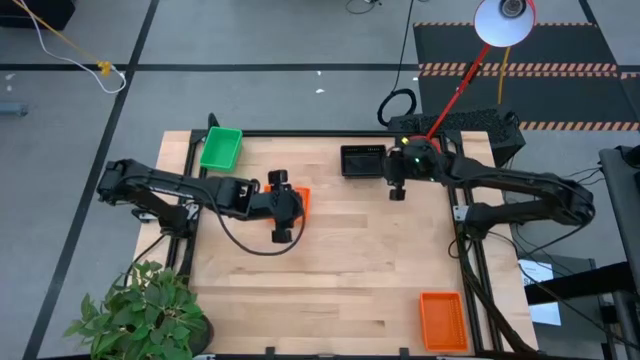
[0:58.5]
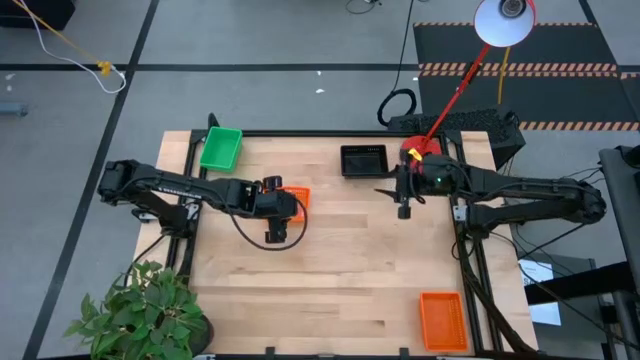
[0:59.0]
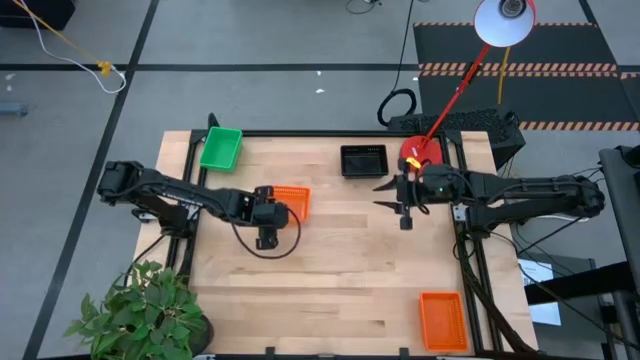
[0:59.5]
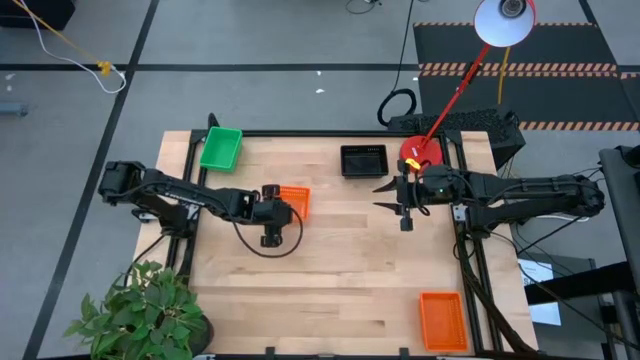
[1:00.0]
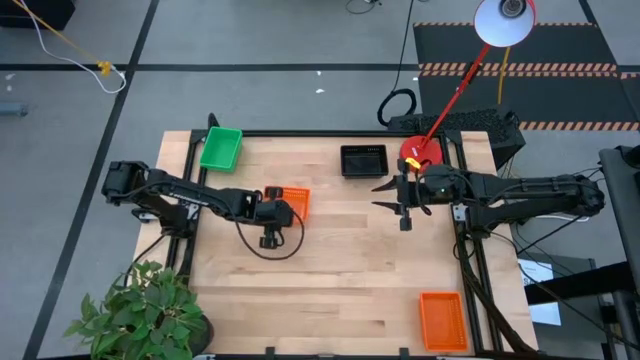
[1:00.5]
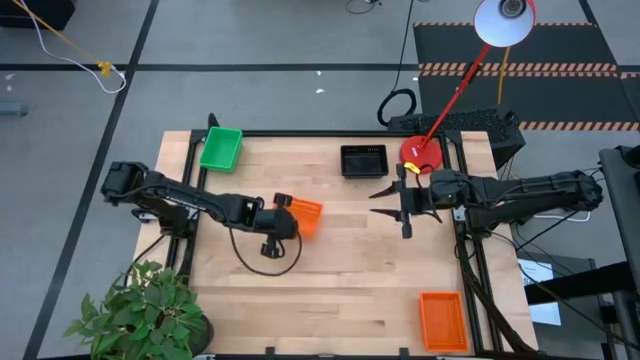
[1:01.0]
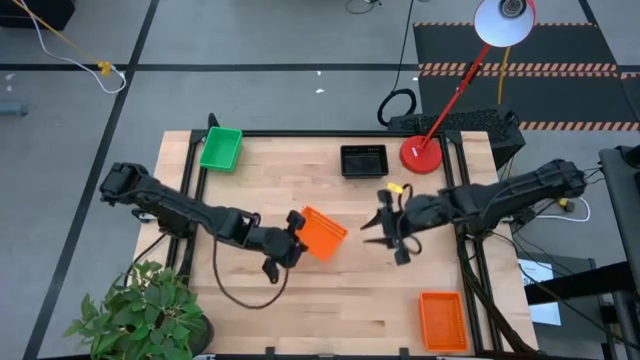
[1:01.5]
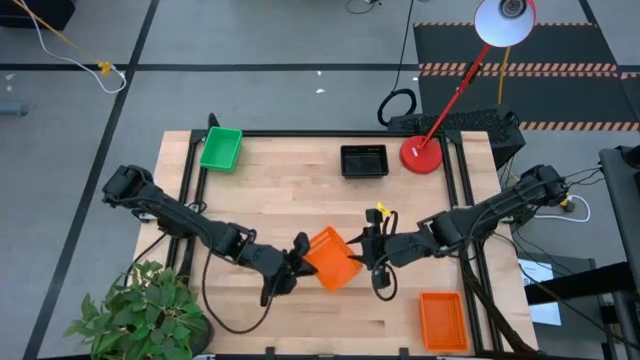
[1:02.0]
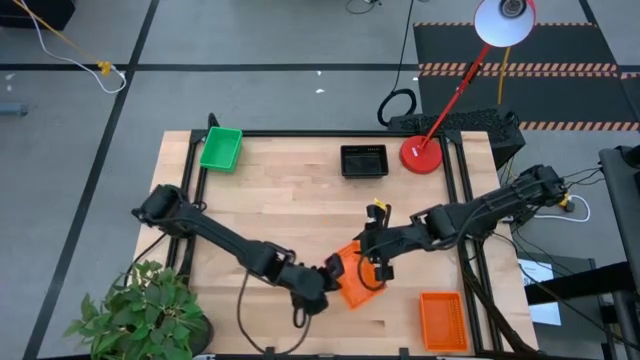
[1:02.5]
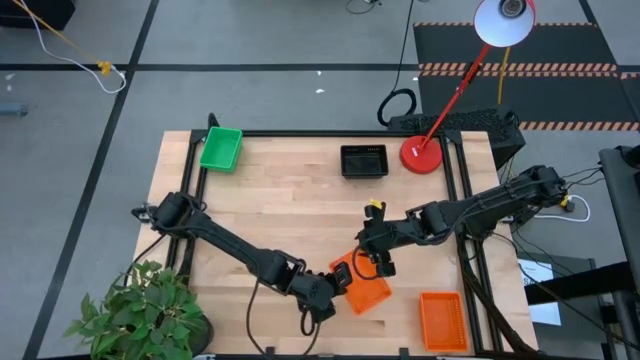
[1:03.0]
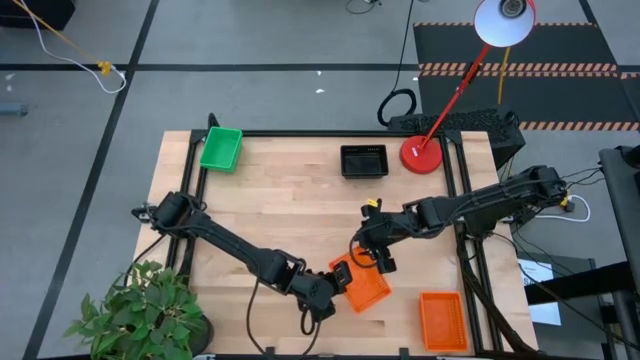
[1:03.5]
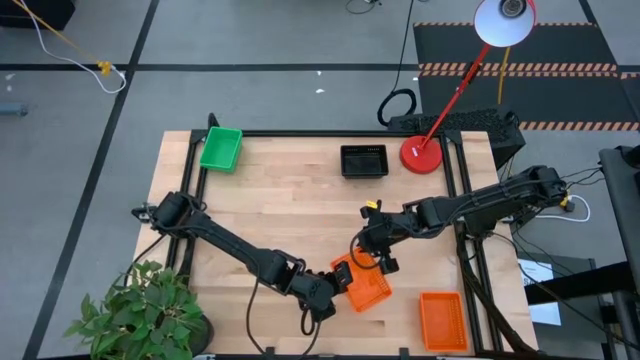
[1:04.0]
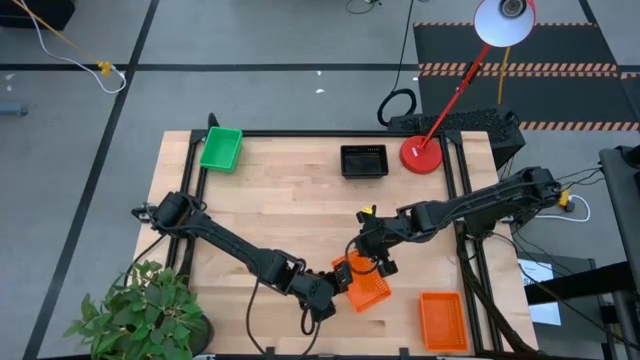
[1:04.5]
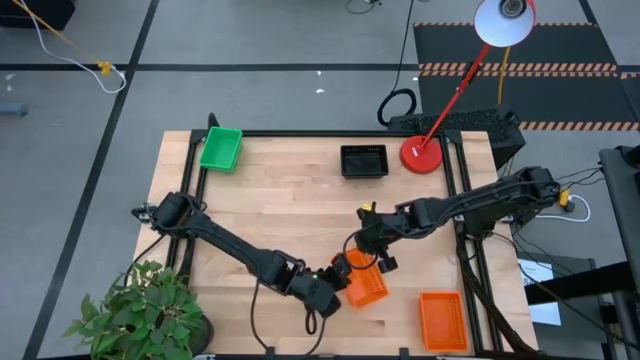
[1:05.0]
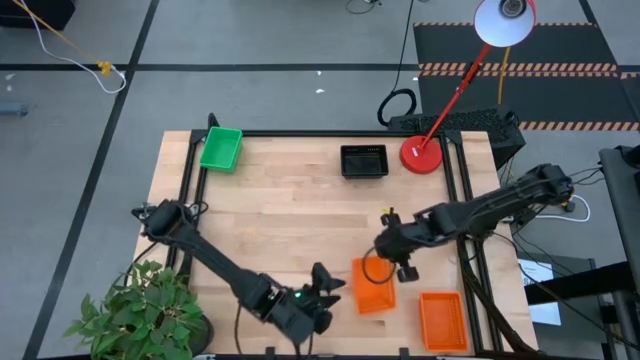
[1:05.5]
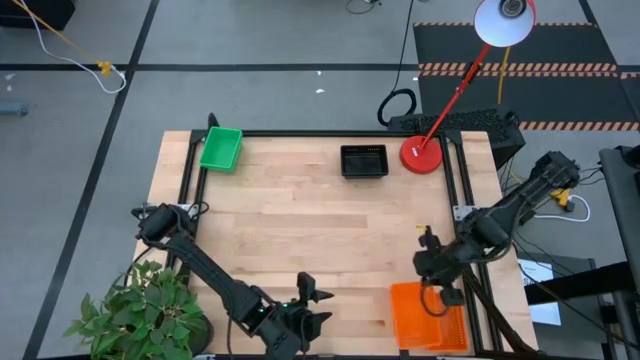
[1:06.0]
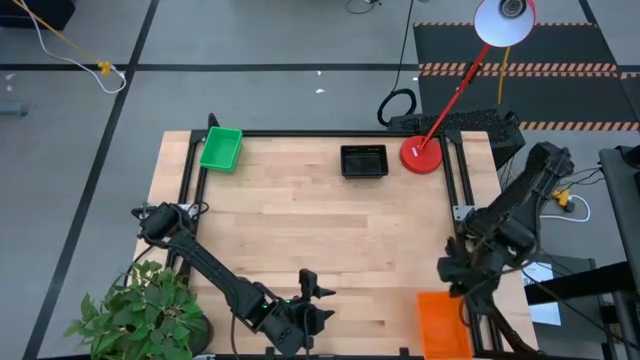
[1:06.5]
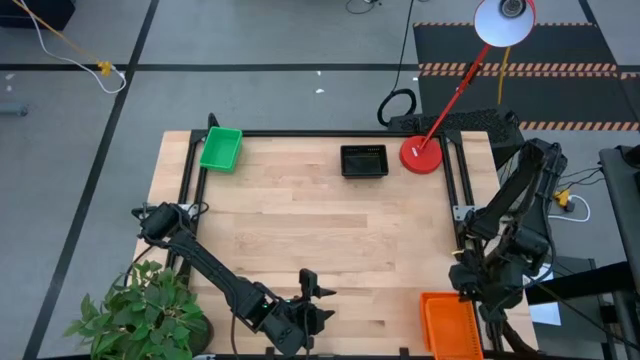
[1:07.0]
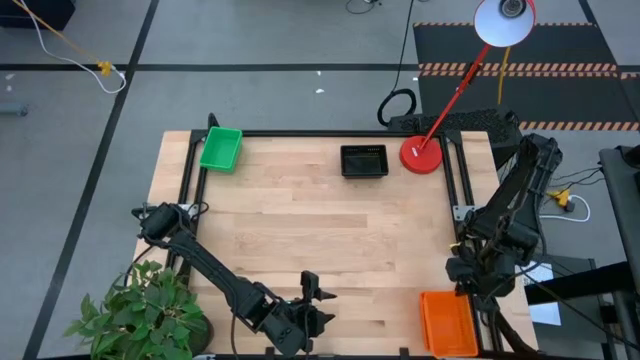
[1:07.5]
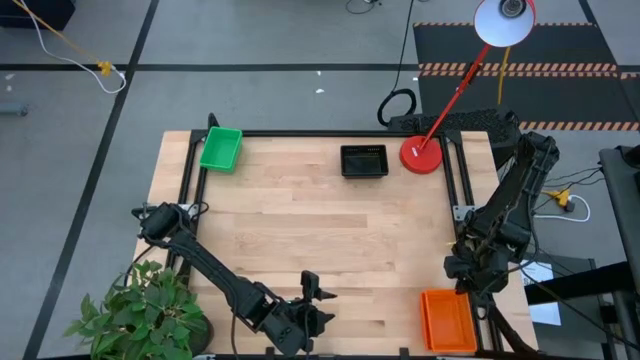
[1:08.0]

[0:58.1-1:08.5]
Stack the left orange bin on top of the right orange bin

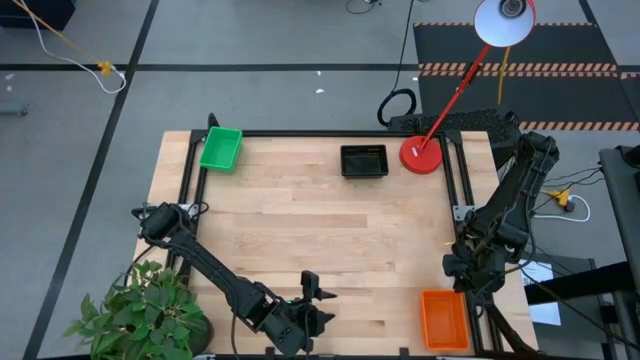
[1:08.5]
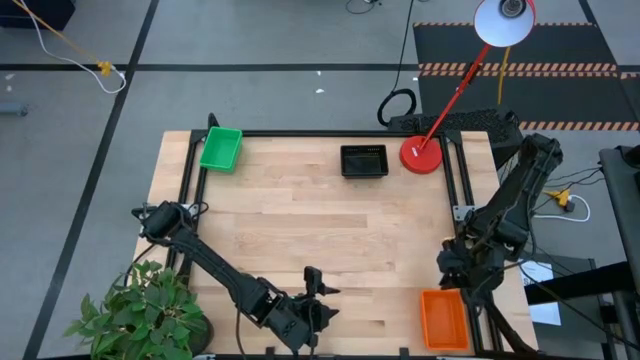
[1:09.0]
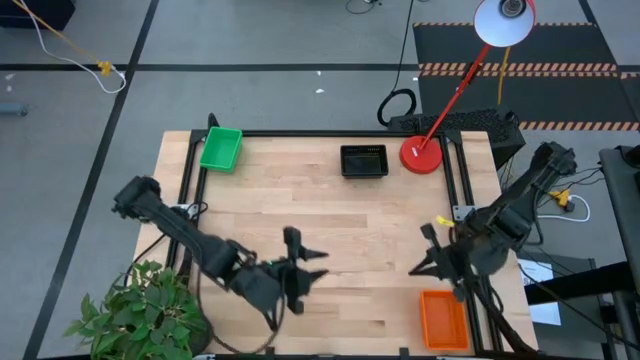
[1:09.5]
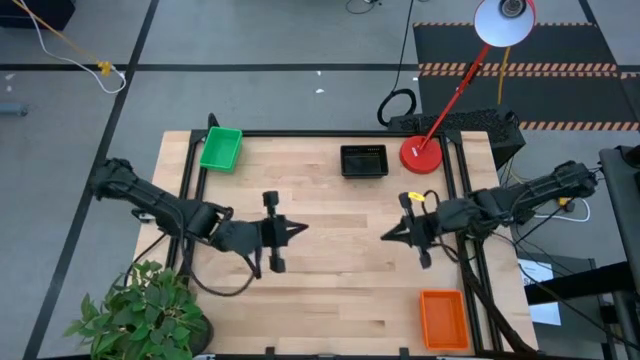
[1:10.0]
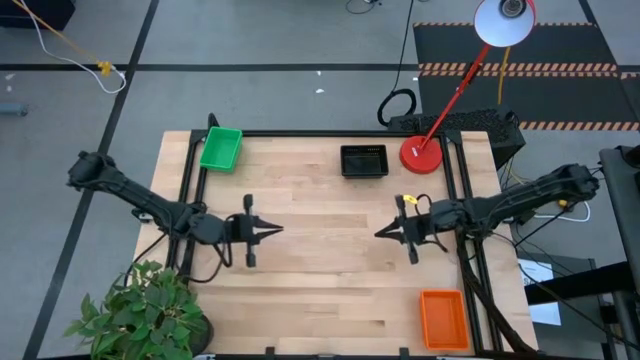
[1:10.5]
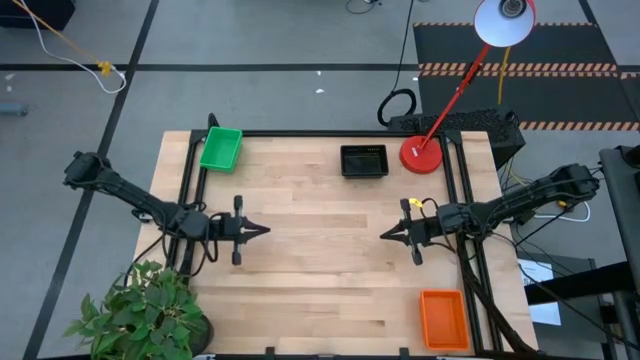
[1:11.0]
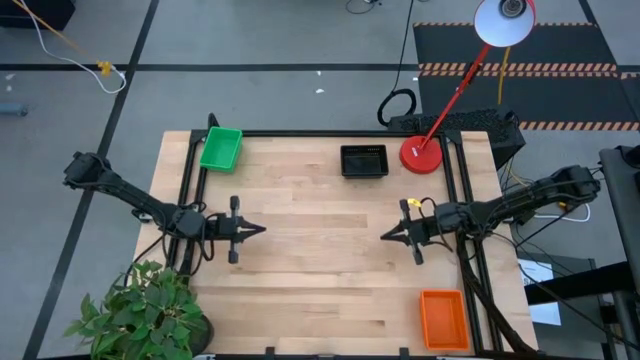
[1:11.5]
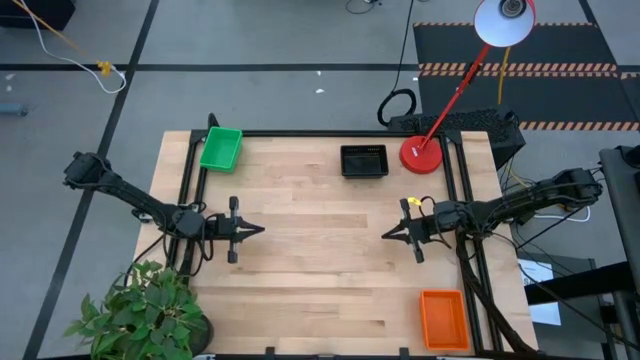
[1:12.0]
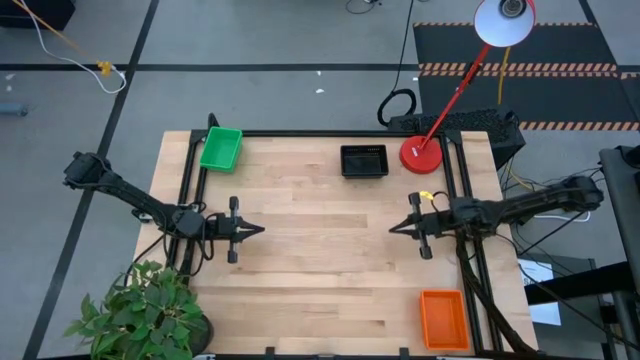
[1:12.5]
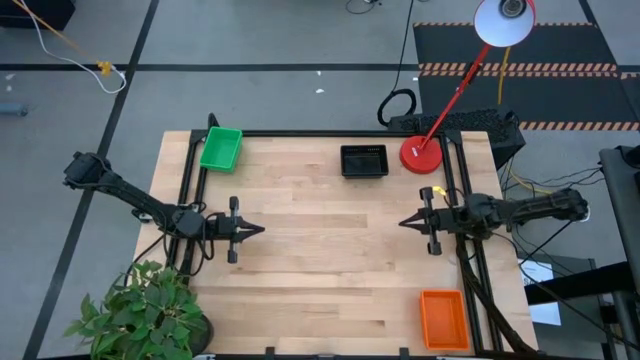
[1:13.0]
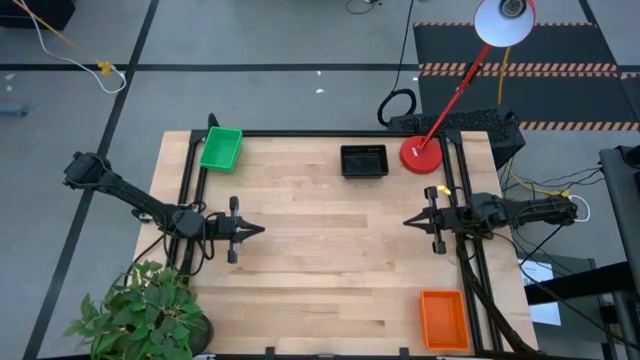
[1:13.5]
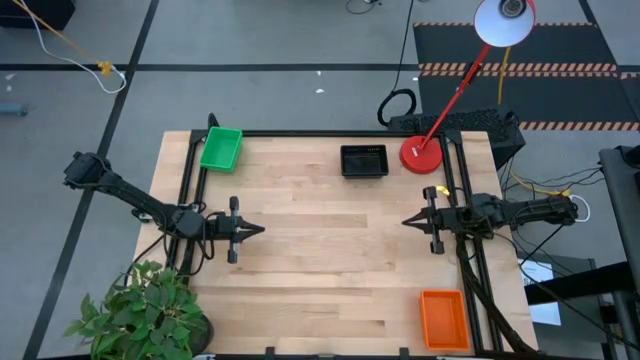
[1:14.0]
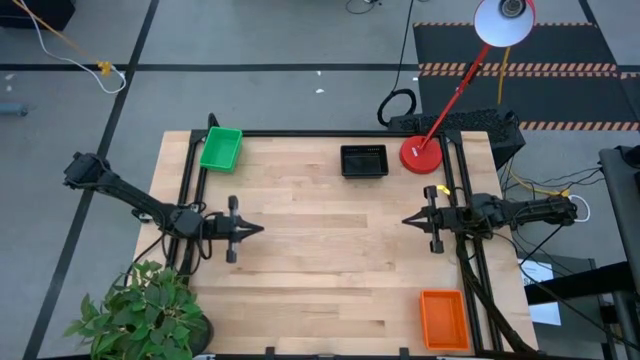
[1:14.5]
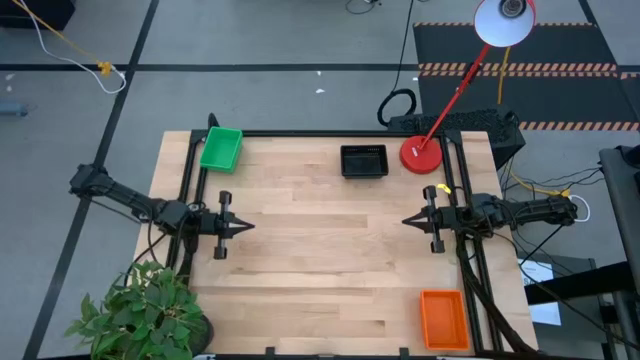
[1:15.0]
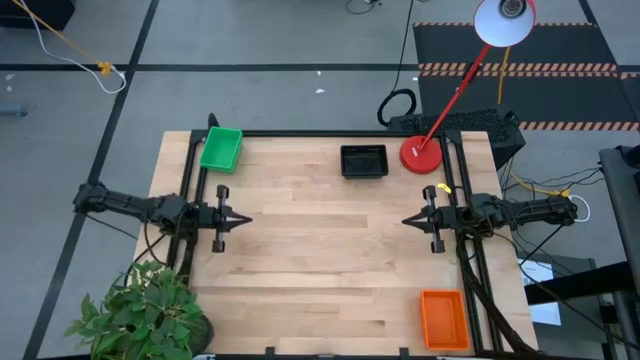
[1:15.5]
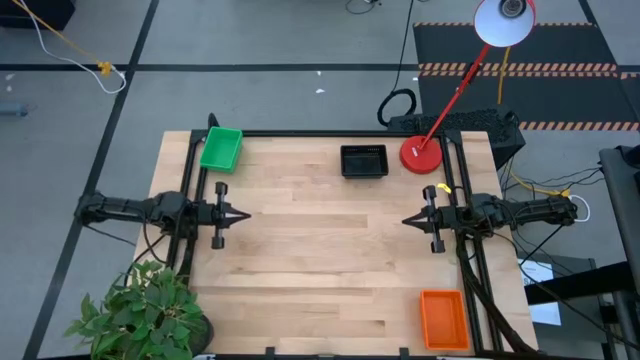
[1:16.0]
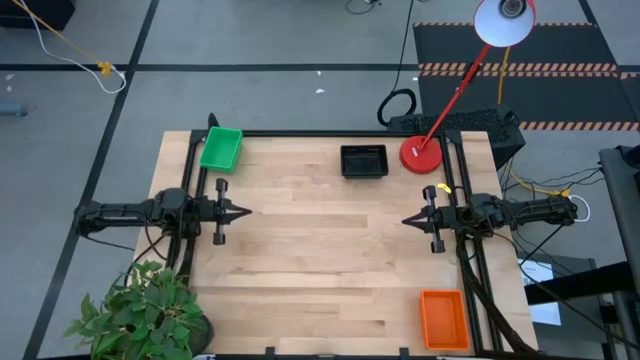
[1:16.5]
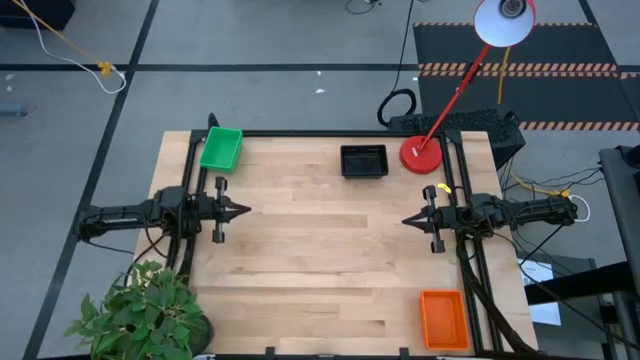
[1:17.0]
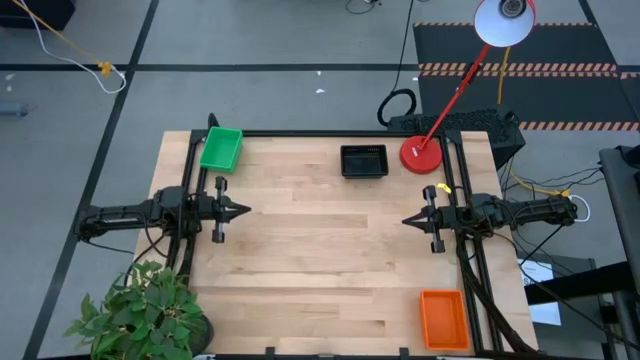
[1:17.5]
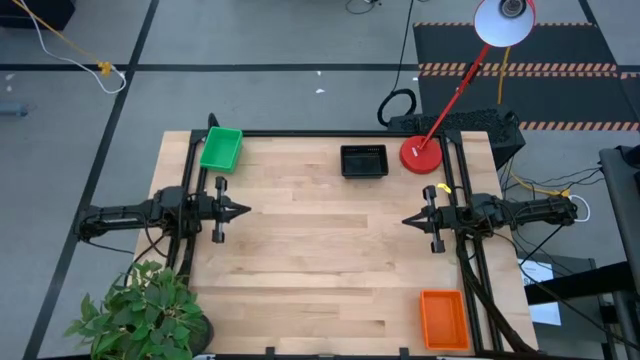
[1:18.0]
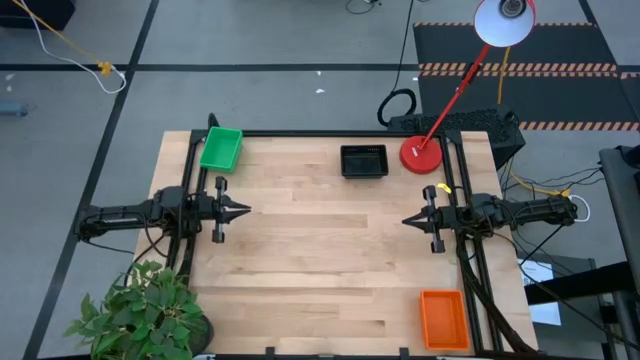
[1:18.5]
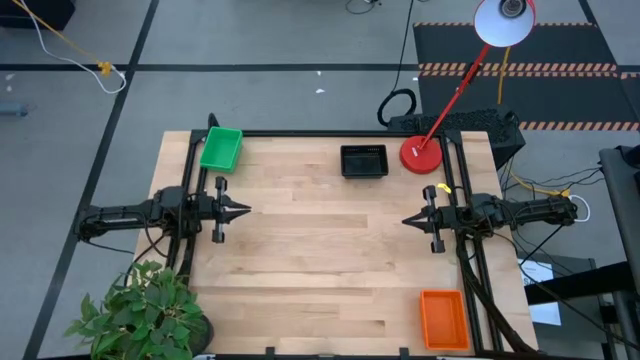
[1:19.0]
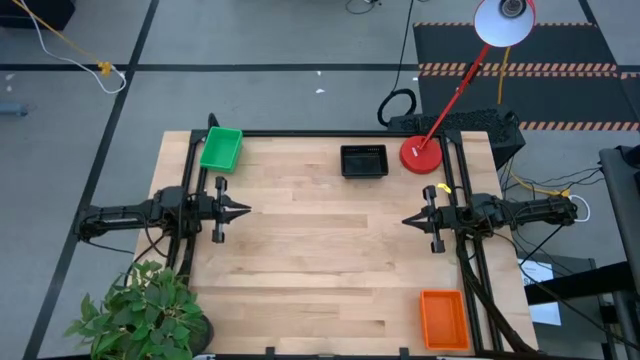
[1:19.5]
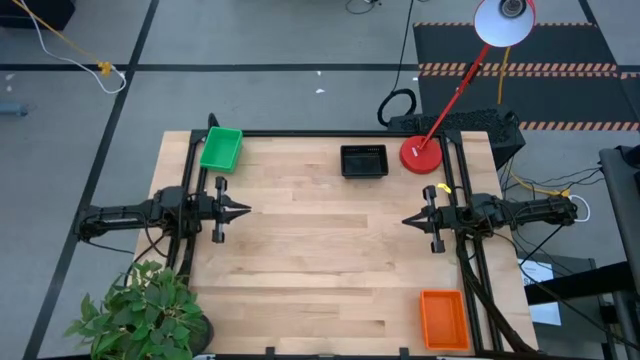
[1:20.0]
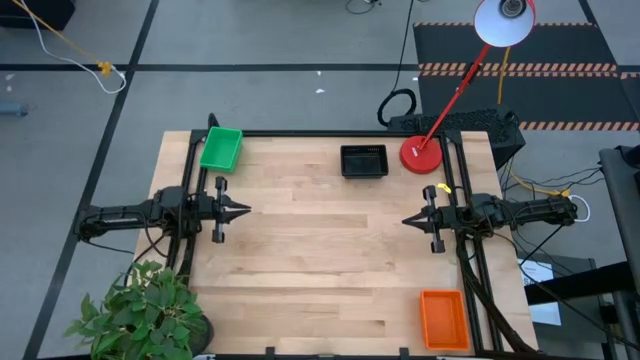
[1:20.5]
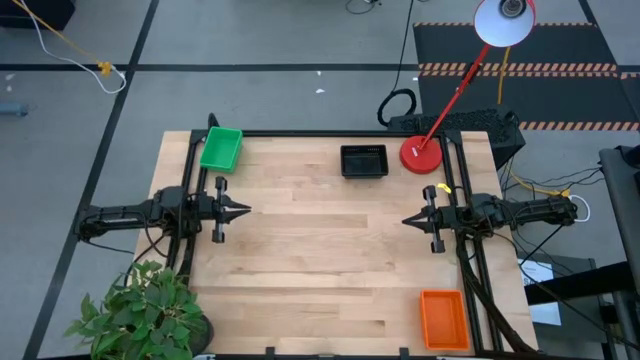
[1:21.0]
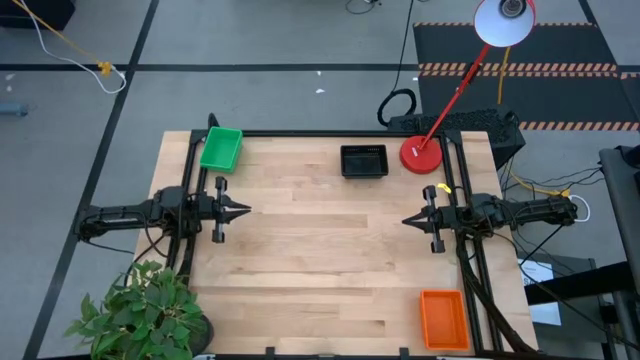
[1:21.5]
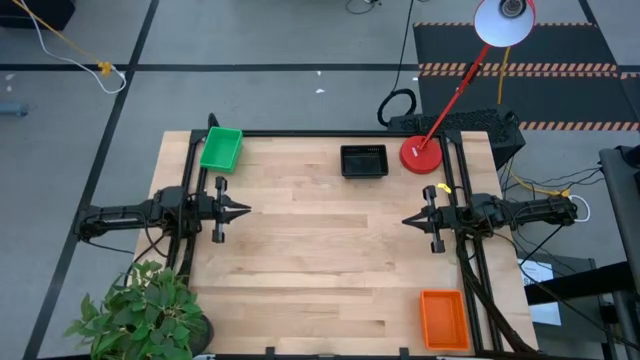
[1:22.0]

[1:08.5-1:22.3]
Return to Home Position
